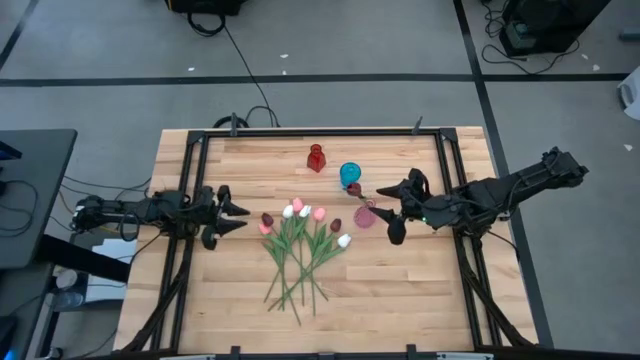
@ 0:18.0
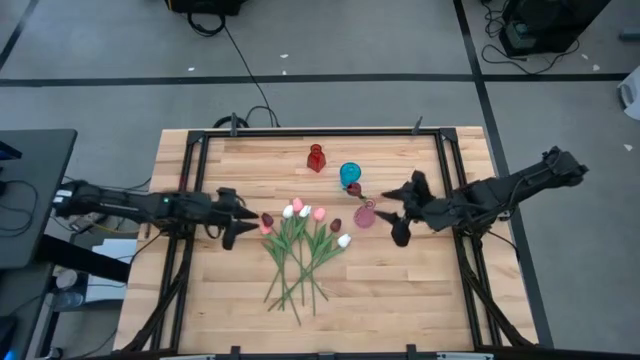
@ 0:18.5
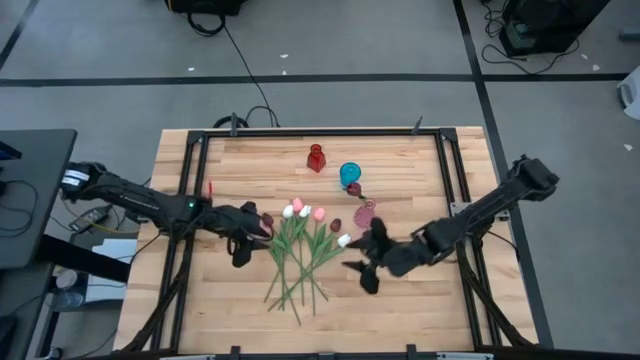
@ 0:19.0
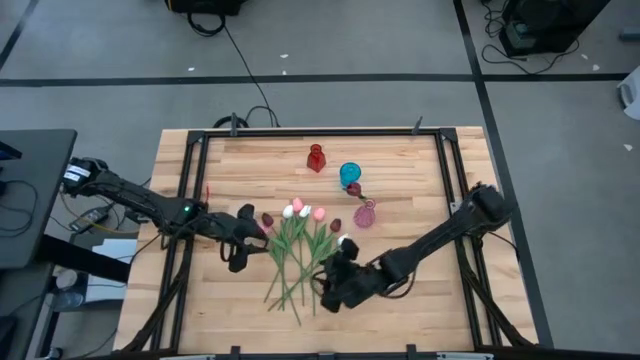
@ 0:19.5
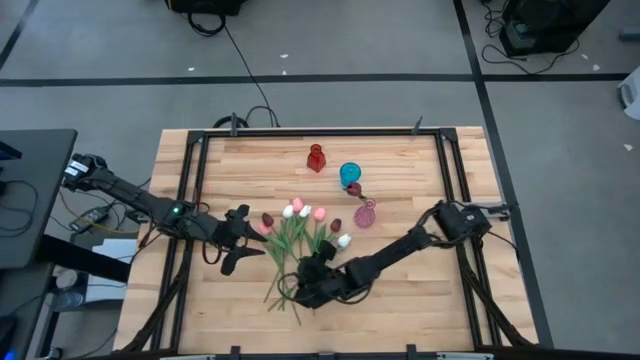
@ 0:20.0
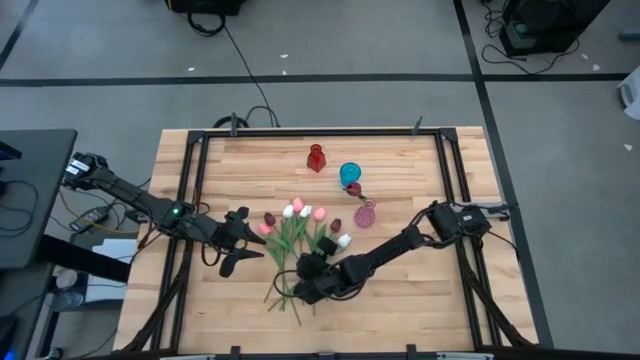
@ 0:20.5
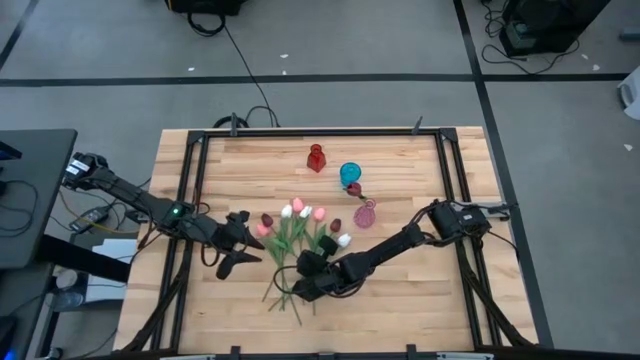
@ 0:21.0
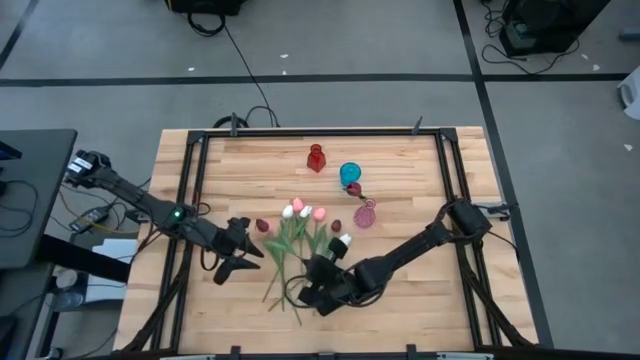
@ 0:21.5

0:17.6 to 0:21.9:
Task: Sort flowers into vase by color
Put the left red tulip into the pink vase

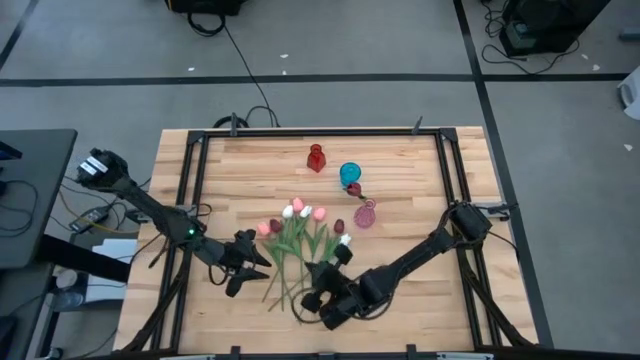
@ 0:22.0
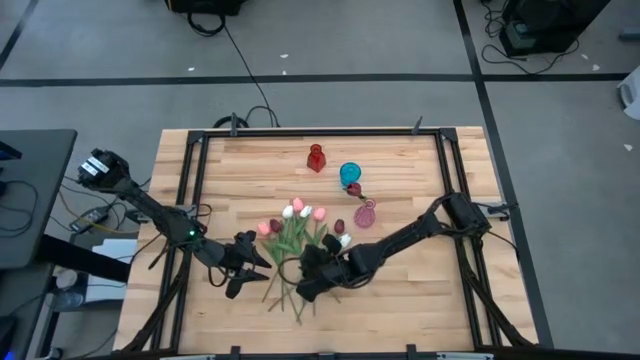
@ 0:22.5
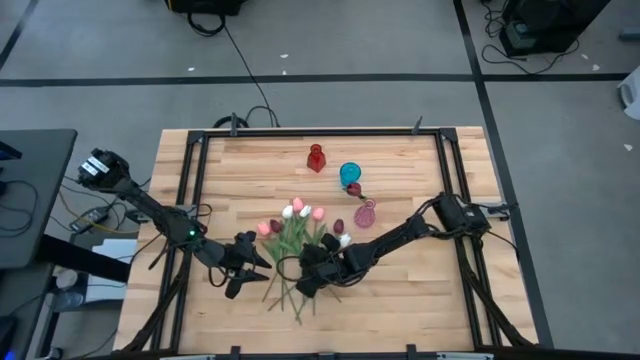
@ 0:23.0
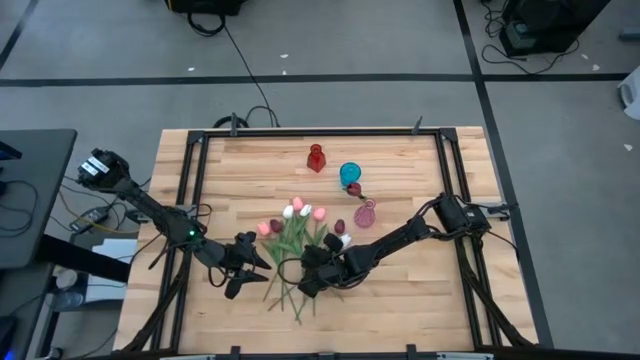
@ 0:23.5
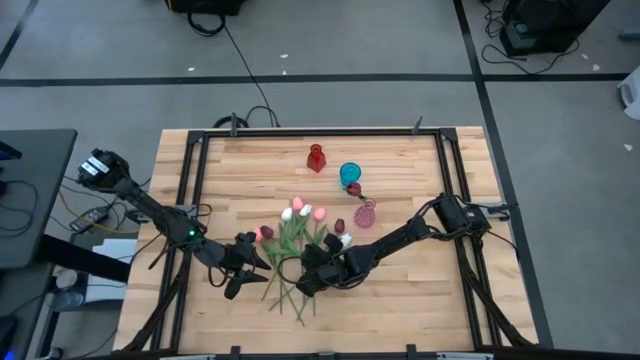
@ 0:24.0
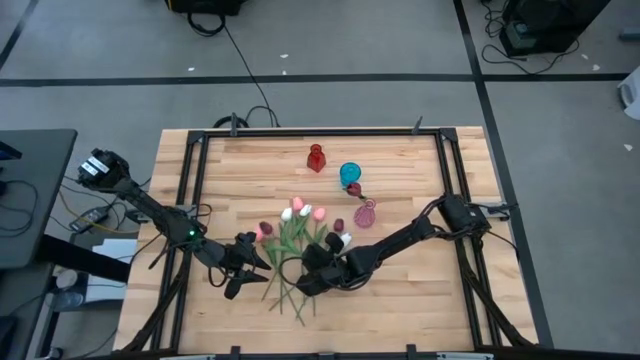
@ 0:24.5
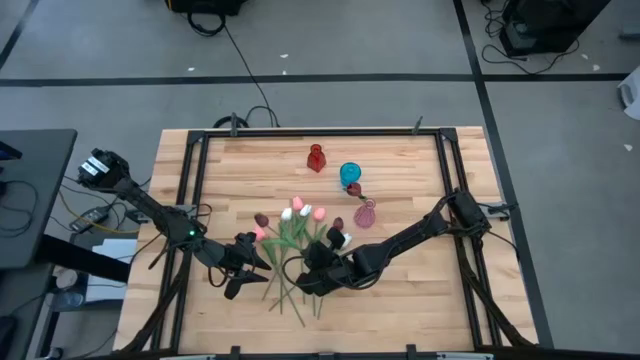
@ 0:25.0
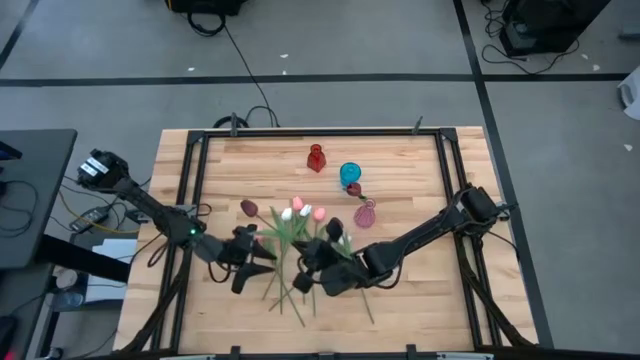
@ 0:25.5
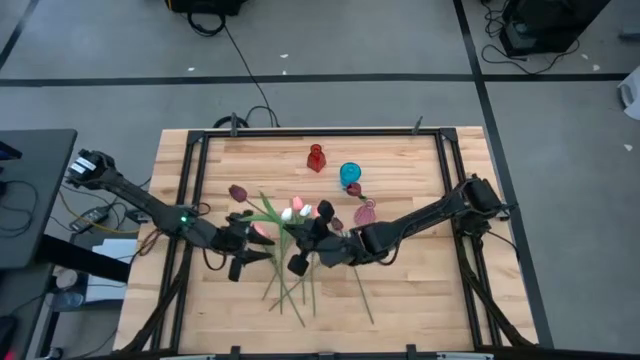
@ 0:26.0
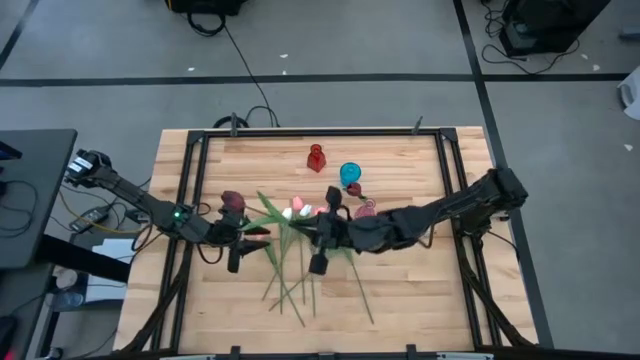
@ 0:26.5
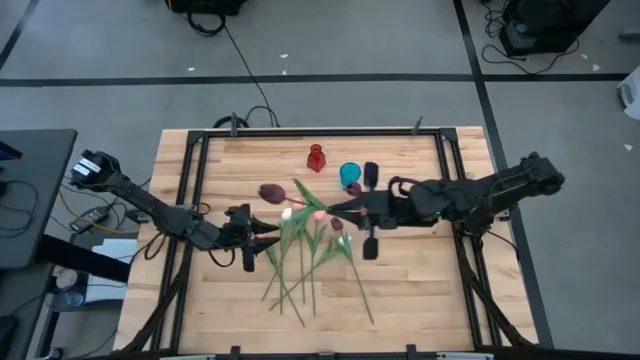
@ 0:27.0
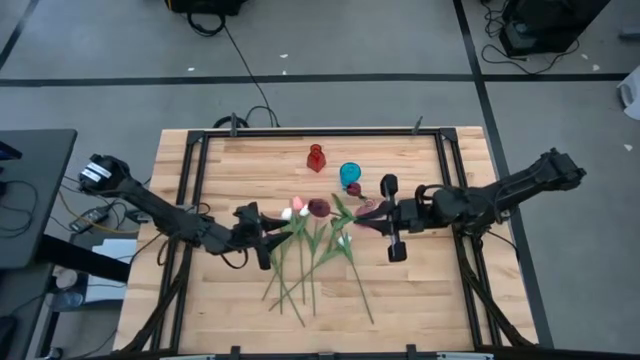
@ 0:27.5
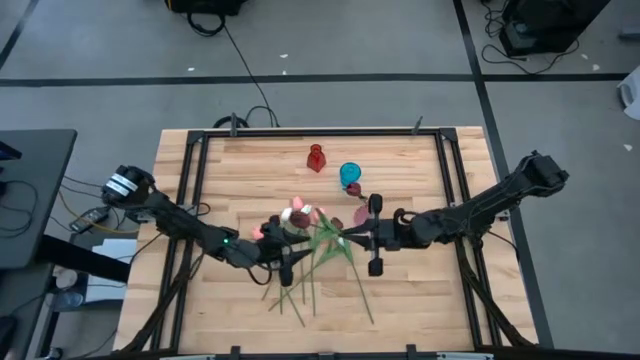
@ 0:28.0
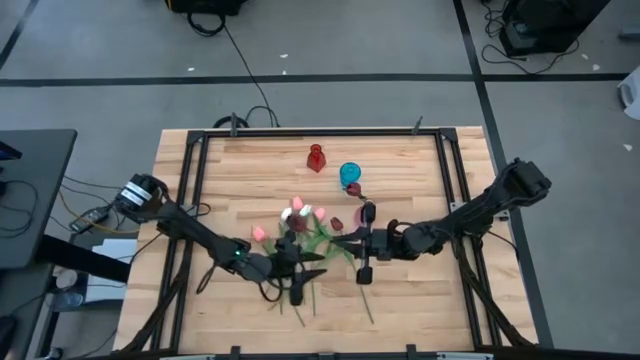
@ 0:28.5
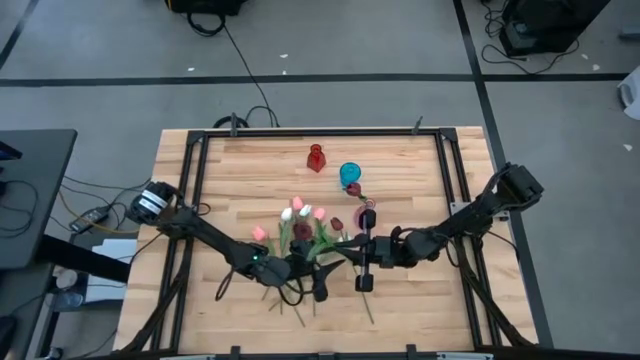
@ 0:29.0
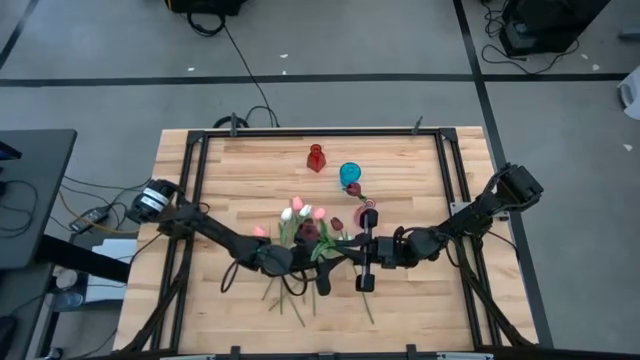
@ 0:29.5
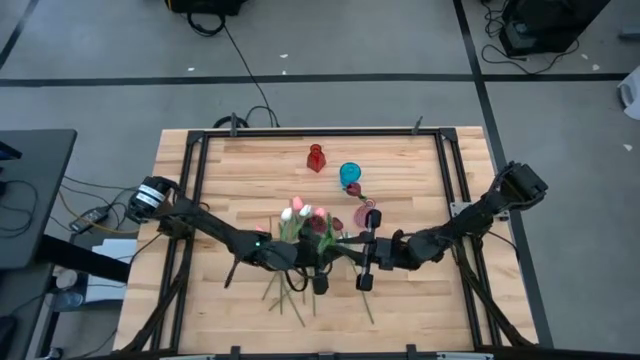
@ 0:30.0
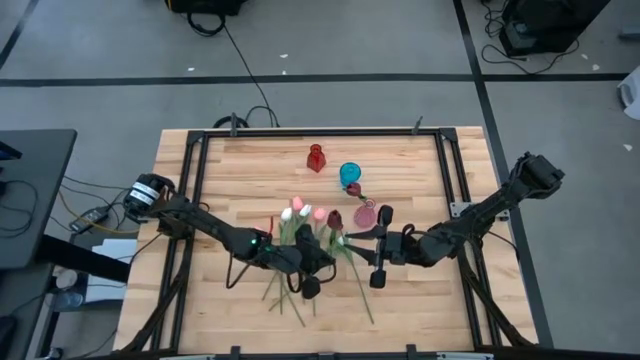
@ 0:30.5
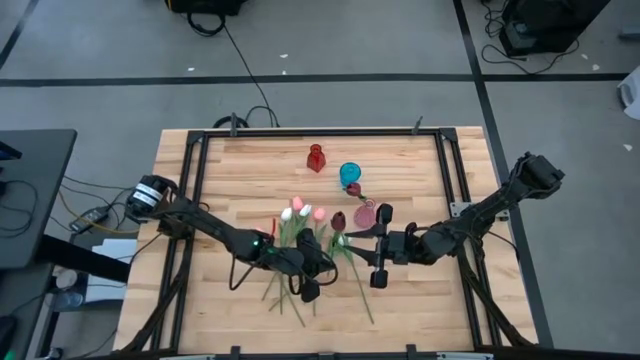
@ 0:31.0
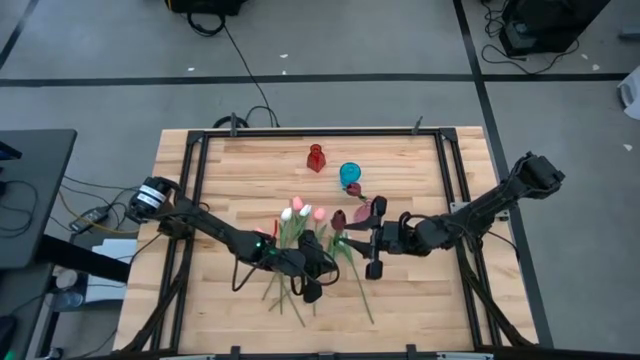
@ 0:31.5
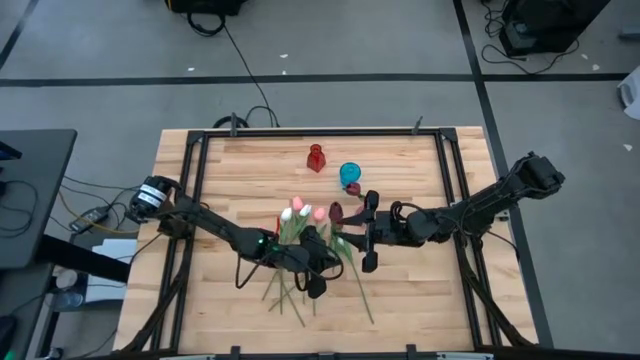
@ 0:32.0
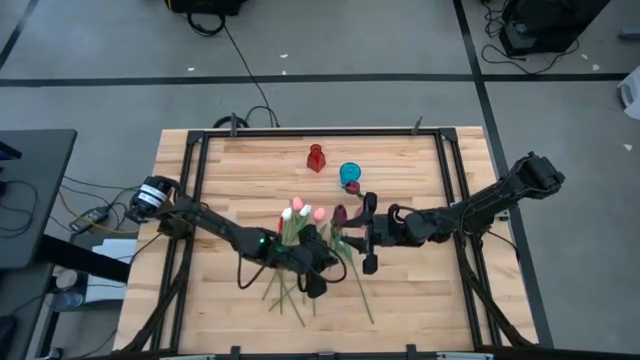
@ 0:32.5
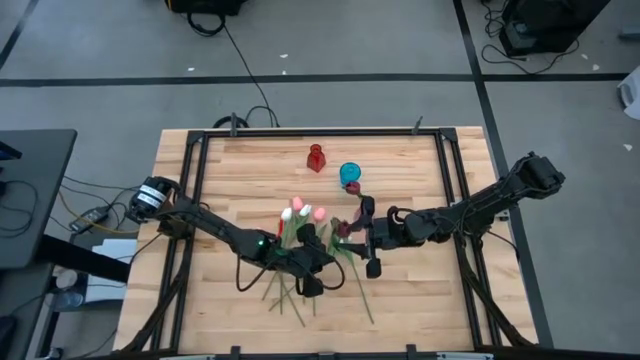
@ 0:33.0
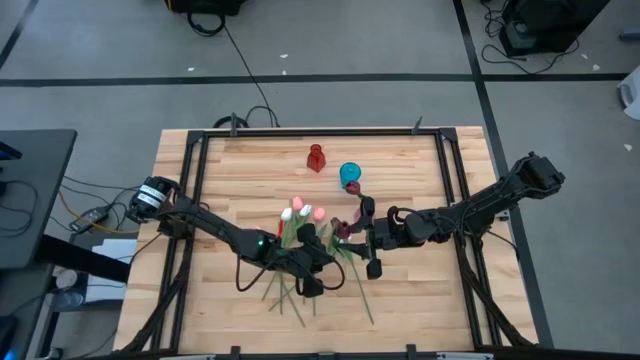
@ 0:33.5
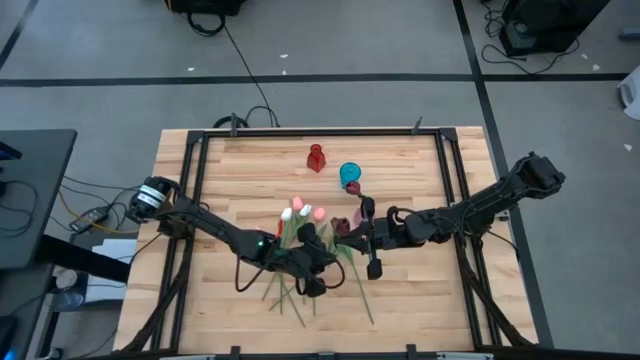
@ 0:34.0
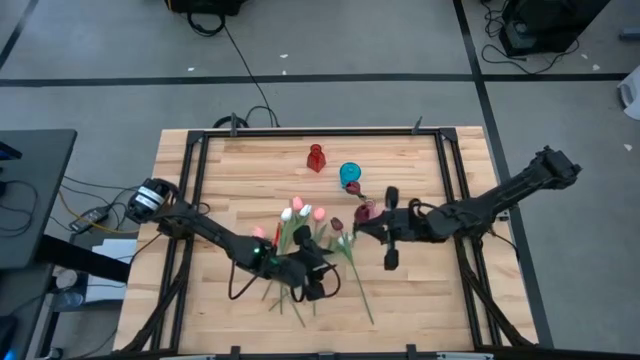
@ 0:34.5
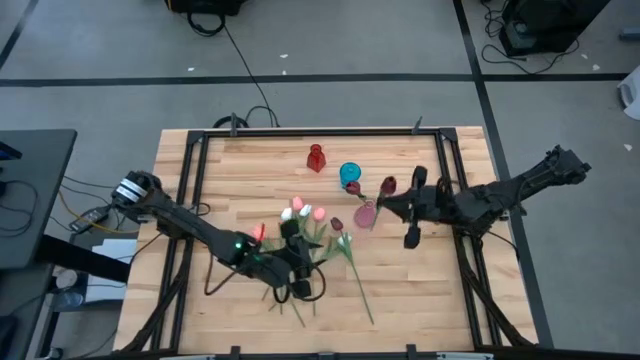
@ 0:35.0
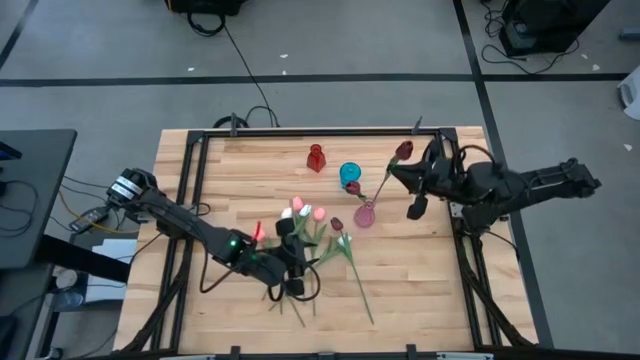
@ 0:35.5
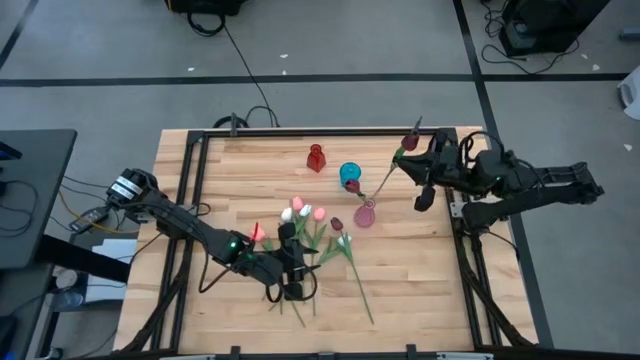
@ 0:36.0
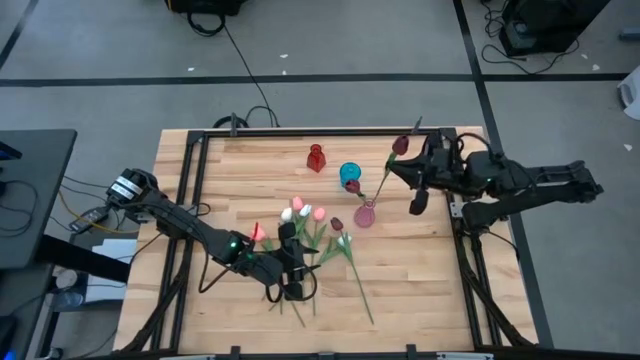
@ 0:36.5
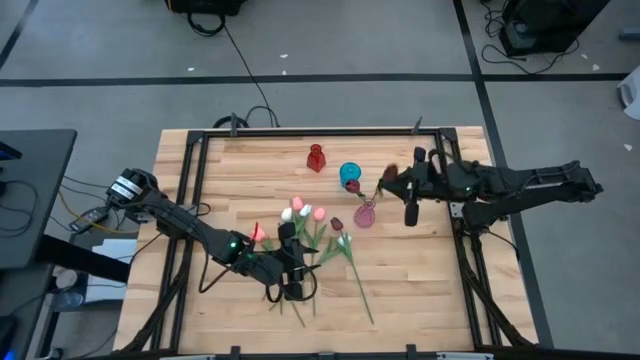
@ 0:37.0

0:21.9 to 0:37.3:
Put the left red tulip into the pink vase

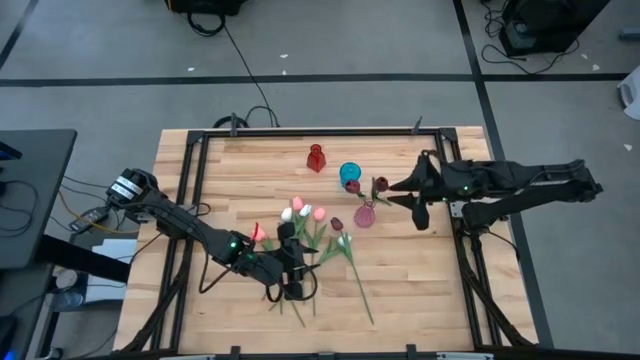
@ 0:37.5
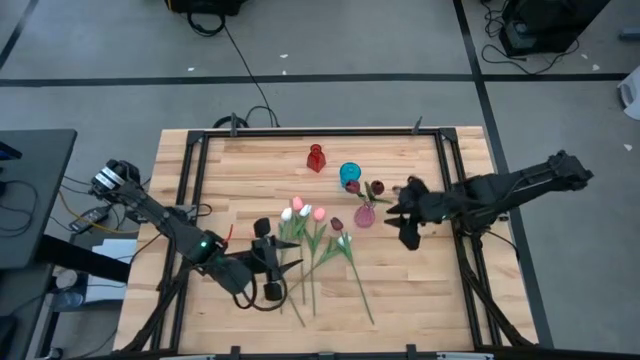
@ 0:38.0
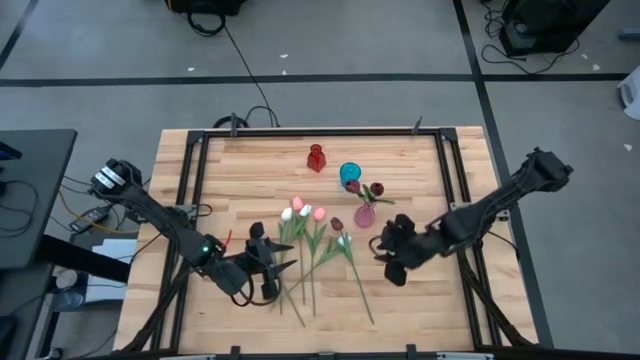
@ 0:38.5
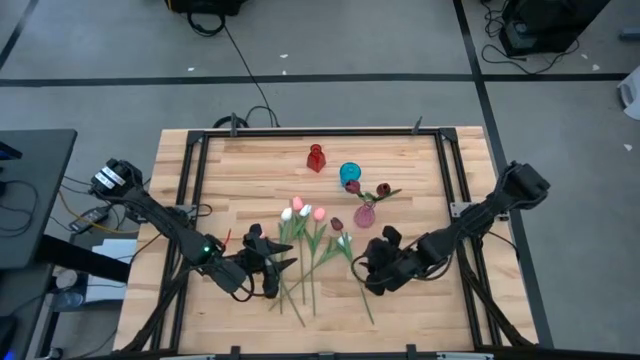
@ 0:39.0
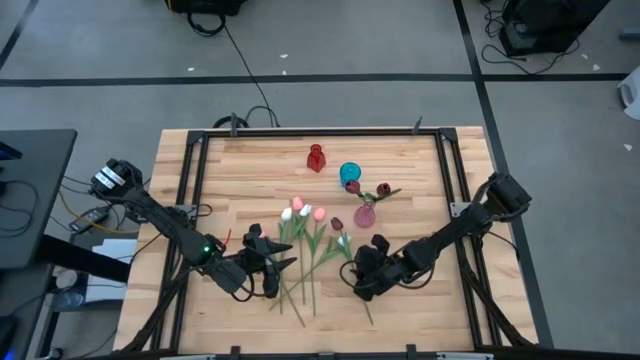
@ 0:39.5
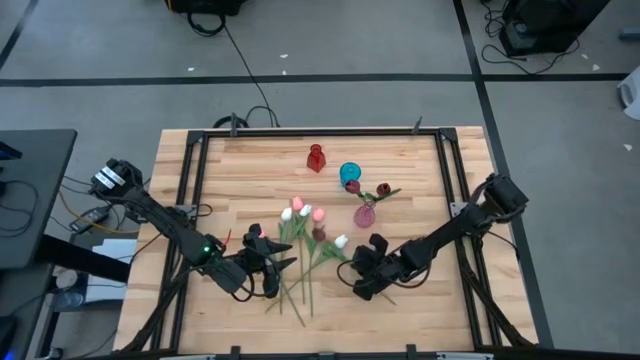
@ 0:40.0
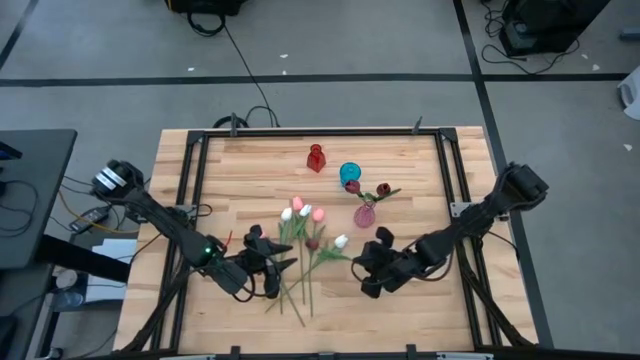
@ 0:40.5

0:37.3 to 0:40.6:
Put the red tulip into the pink vase
